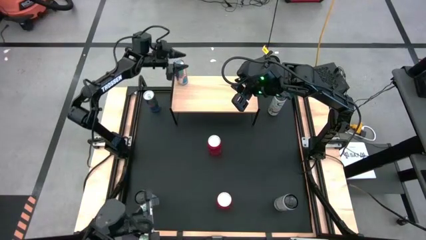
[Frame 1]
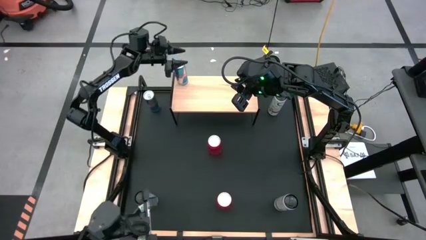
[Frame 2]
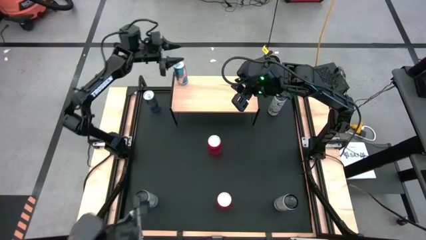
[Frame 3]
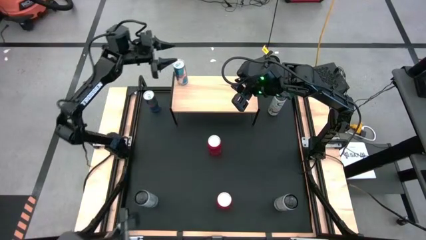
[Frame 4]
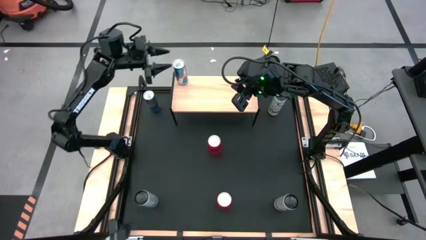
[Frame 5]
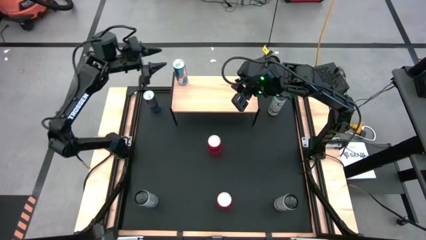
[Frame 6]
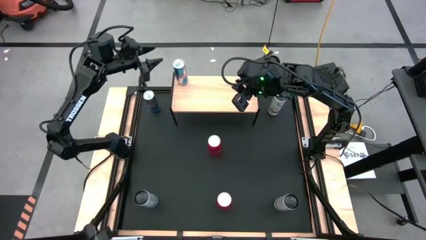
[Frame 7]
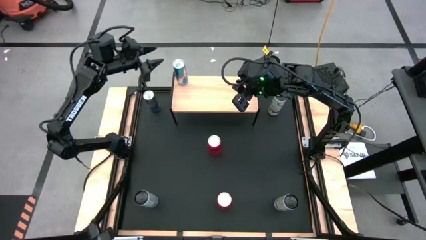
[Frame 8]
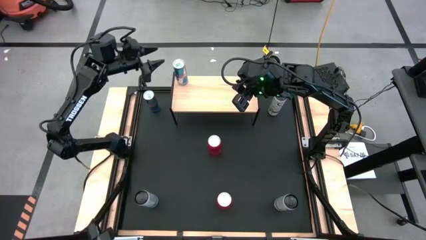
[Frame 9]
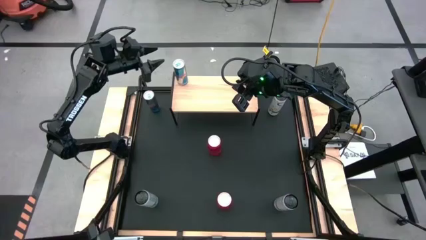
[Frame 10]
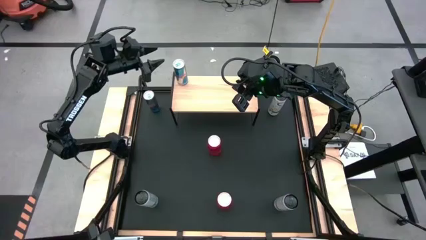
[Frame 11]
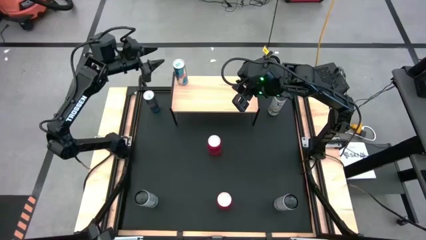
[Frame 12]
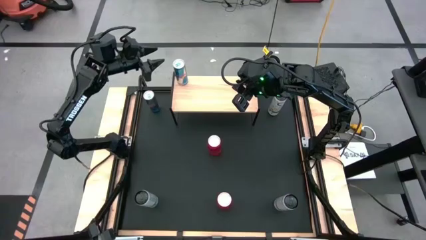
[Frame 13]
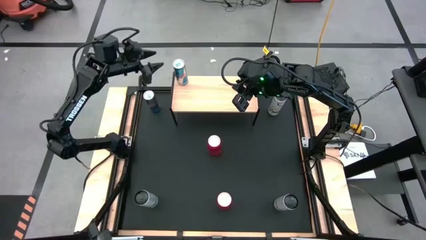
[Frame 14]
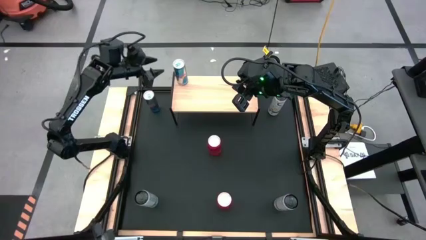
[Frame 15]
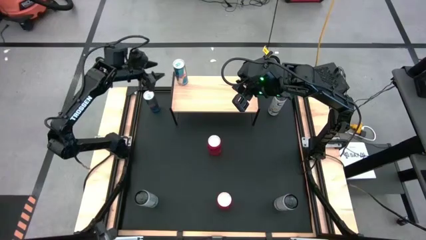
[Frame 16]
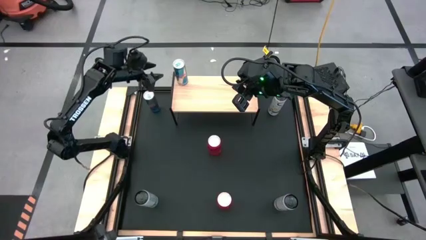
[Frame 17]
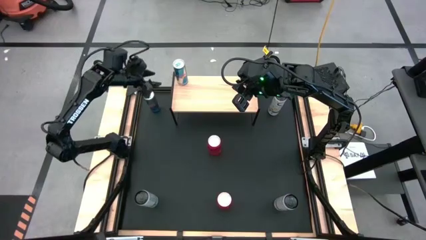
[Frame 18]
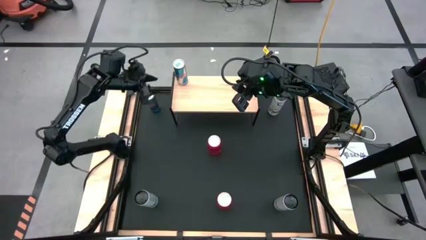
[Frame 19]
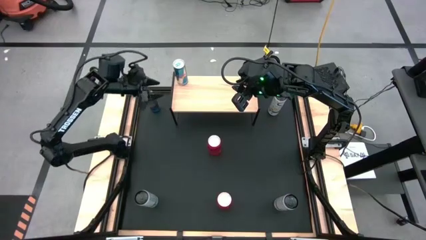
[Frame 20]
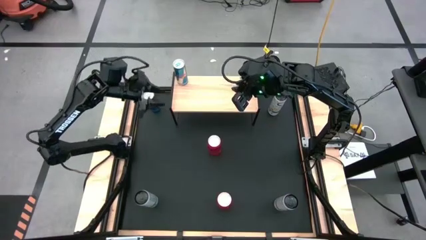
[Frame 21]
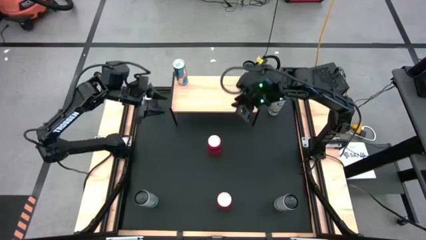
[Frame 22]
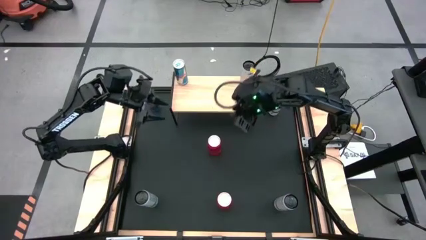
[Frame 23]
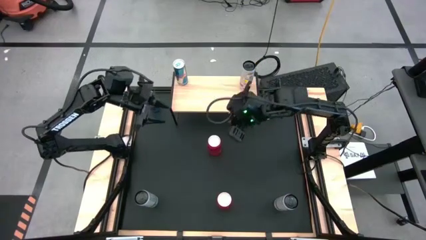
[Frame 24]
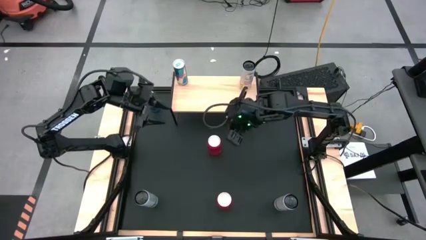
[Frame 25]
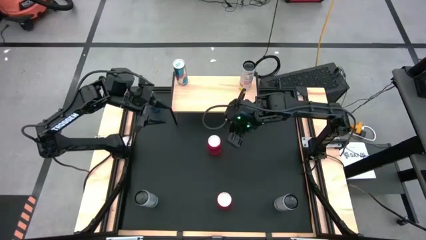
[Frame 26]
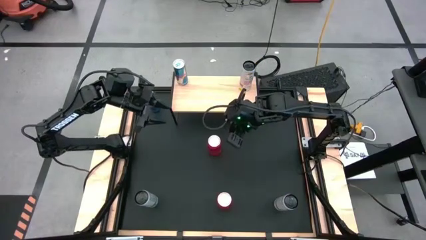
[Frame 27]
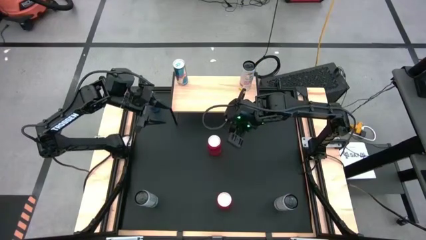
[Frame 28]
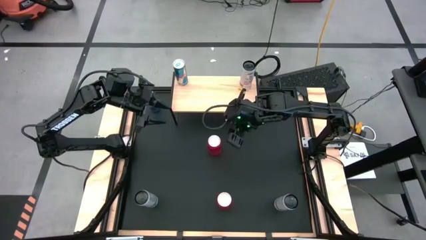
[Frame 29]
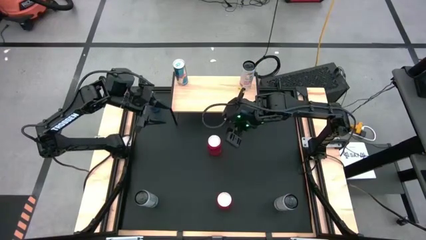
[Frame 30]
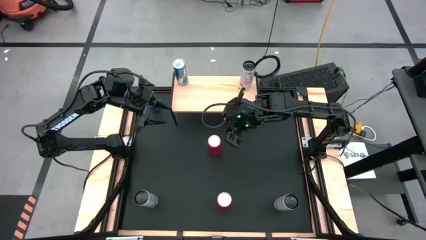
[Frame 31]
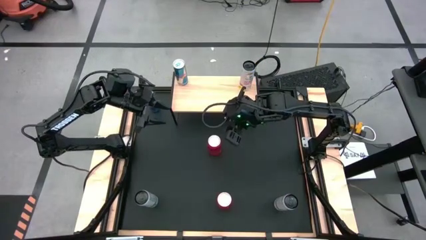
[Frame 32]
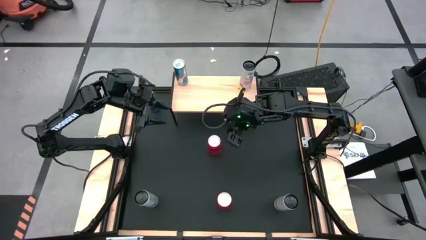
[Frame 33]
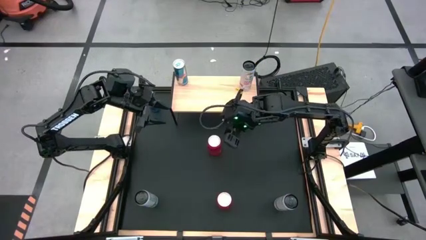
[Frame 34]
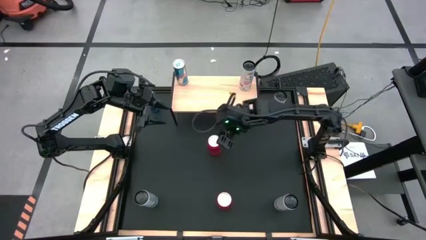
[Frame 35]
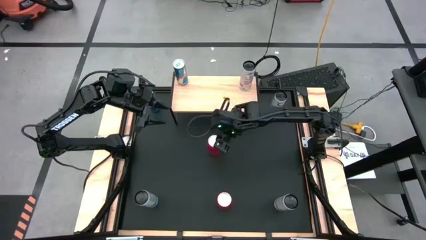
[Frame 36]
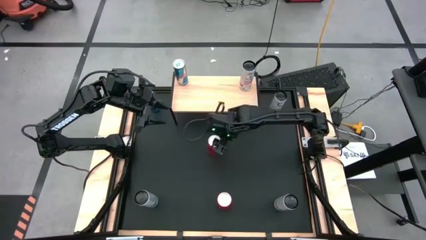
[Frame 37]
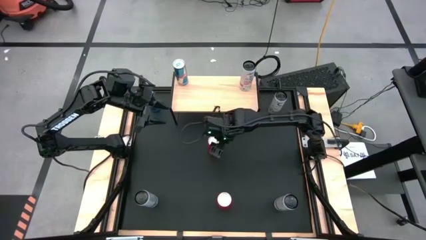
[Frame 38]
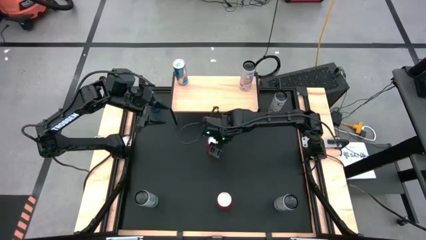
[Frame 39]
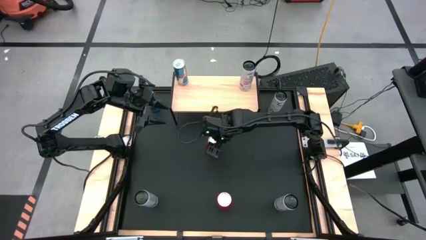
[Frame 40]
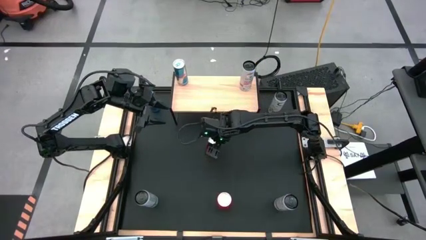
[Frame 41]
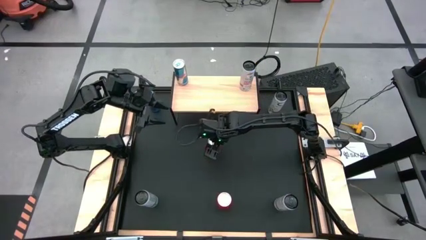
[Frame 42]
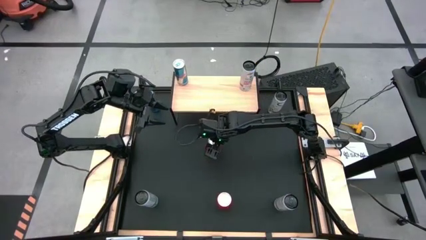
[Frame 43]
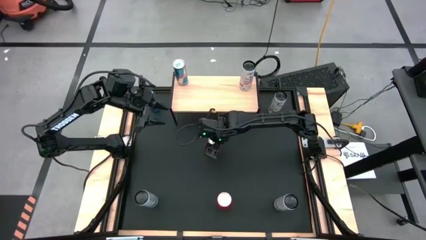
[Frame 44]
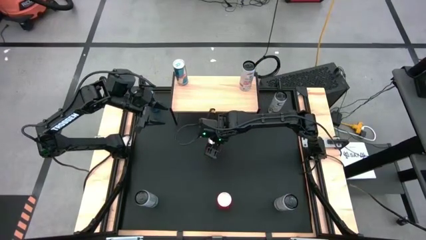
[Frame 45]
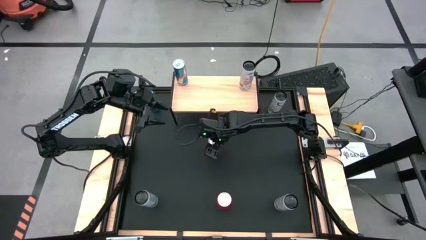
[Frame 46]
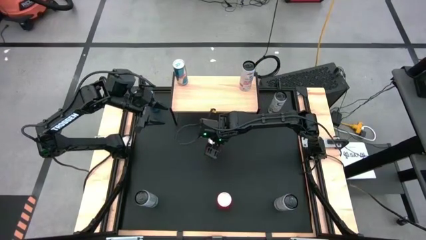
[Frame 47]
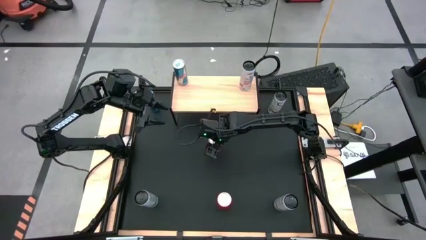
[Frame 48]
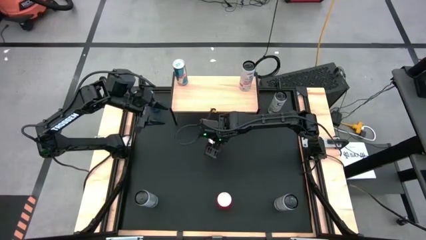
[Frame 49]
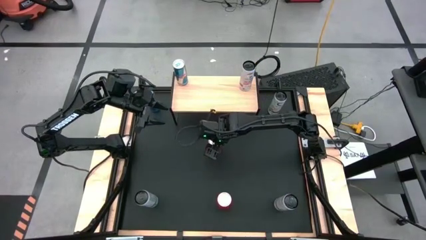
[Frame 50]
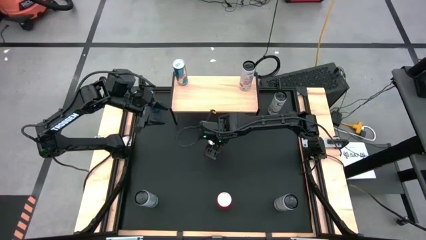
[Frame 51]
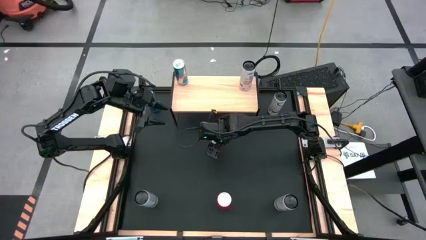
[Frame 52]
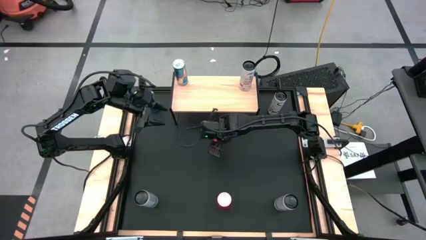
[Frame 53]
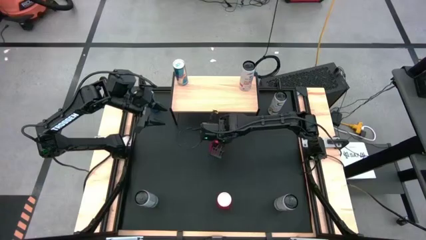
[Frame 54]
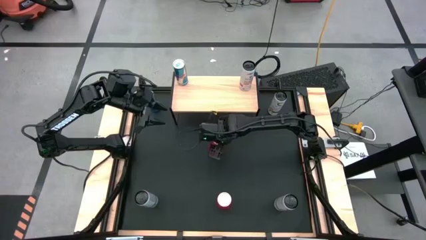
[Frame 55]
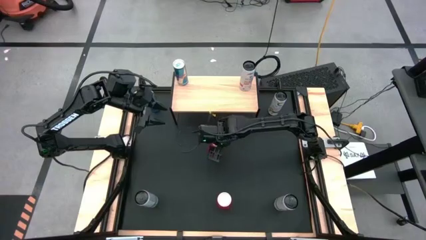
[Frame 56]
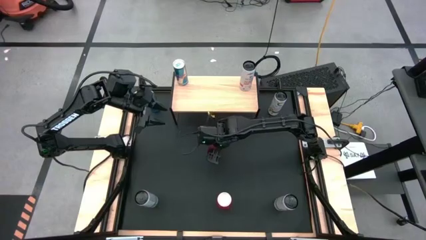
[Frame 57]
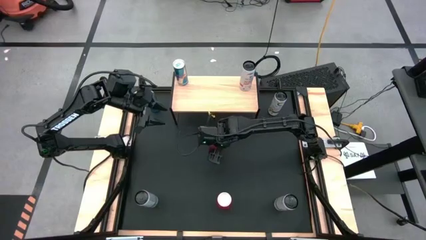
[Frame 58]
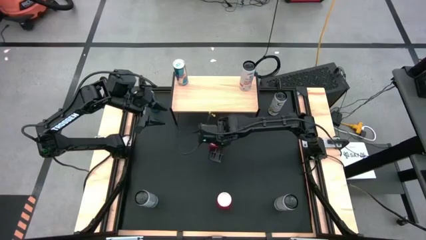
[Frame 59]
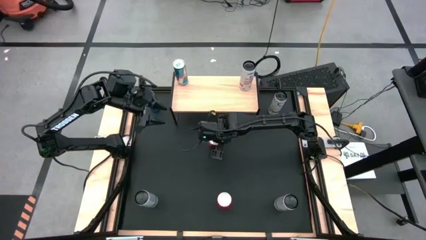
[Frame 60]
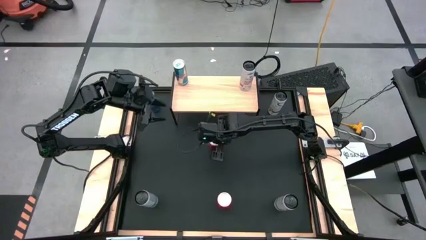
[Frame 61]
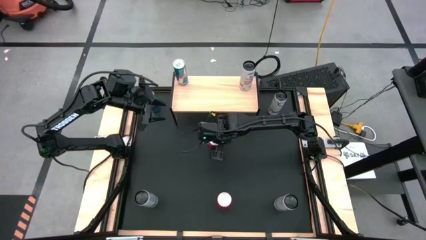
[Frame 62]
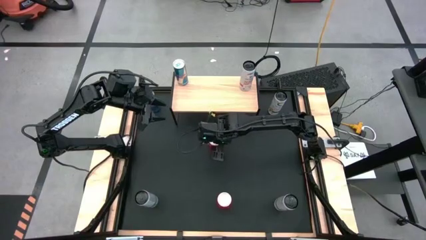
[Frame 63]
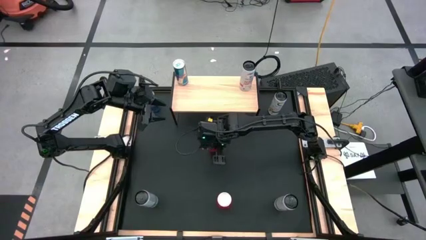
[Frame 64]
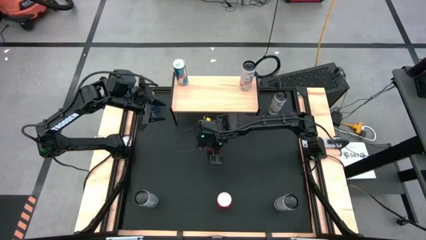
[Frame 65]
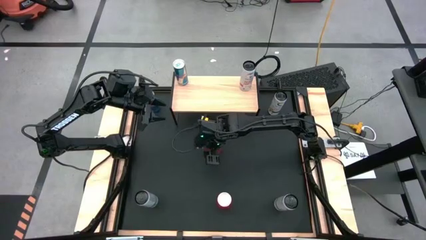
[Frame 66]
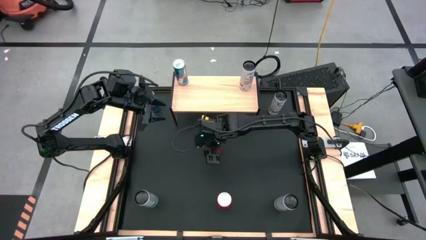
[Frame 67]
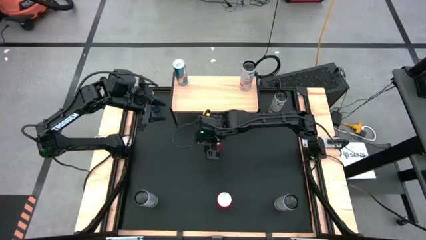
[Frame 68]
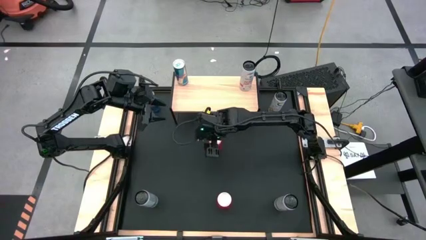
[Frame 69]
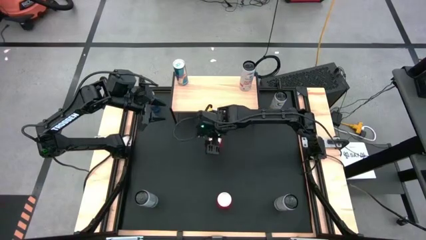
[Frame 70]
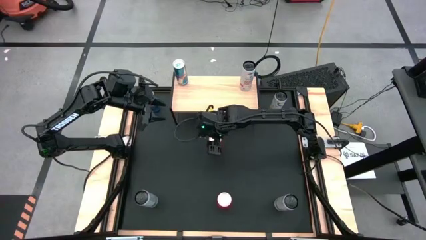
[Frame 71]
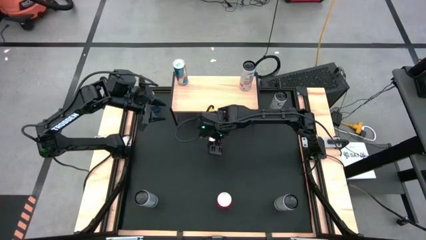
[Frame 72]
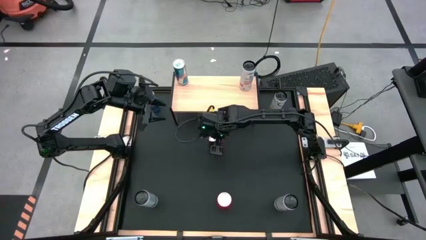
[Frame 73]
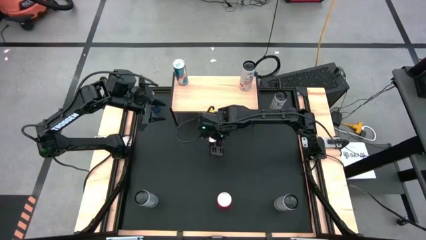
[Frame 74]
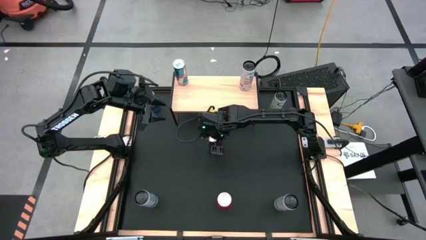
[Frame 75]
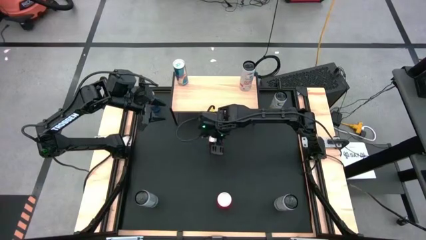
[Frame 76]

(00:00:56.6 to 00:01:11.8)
Task: Place canned beverage on shelf
Put the top red black soda can on the shelf
